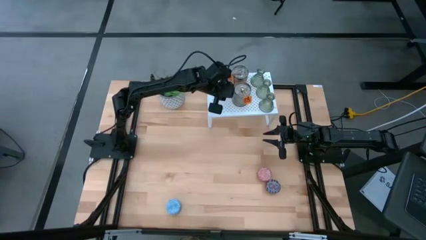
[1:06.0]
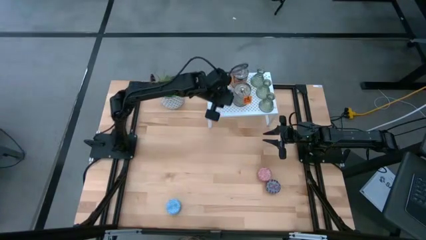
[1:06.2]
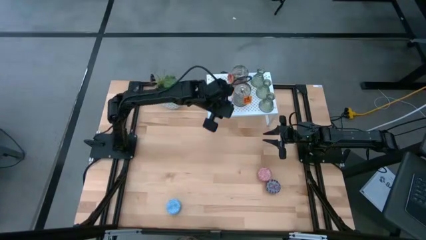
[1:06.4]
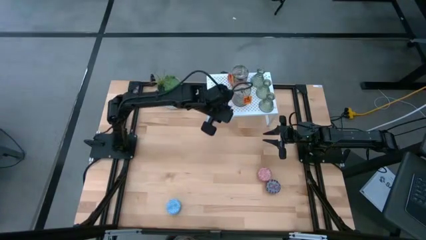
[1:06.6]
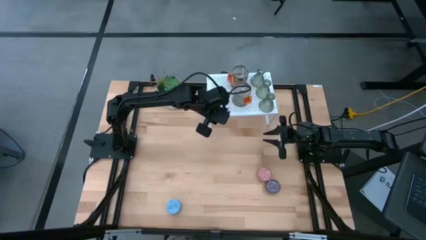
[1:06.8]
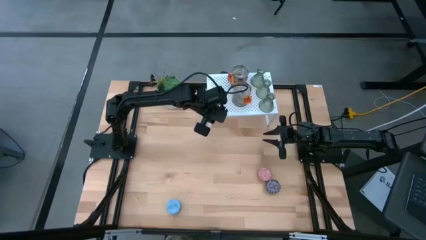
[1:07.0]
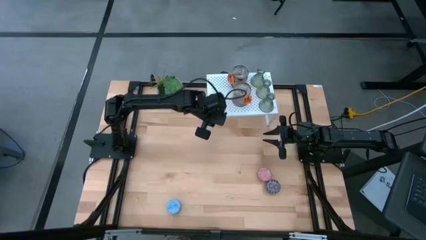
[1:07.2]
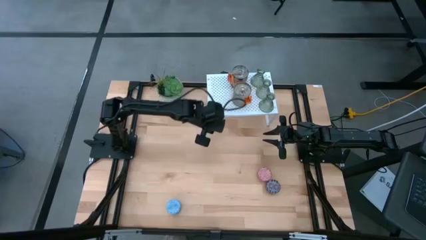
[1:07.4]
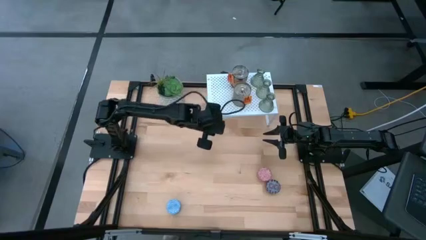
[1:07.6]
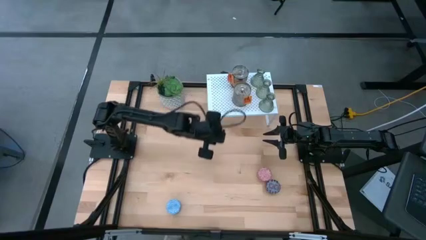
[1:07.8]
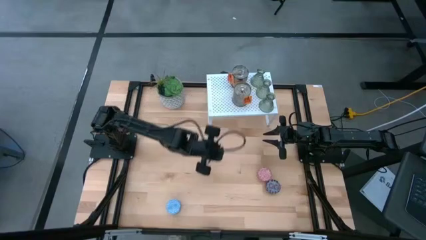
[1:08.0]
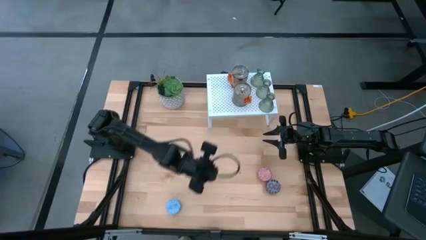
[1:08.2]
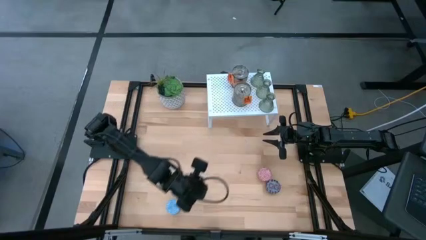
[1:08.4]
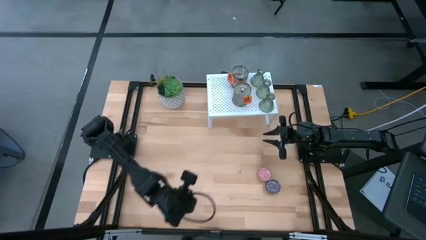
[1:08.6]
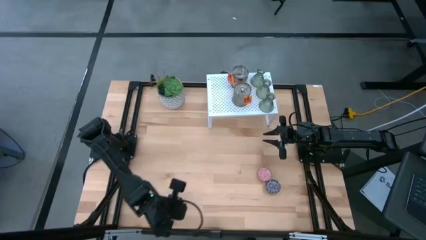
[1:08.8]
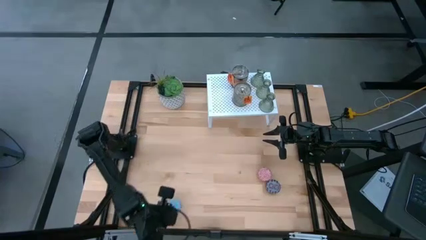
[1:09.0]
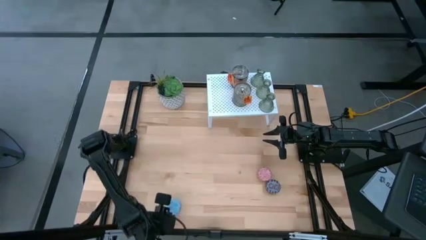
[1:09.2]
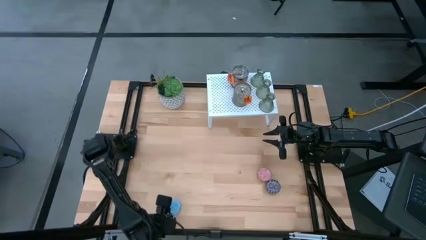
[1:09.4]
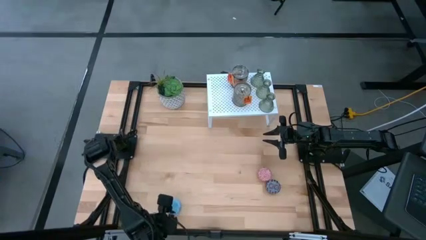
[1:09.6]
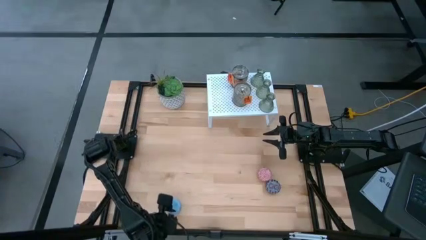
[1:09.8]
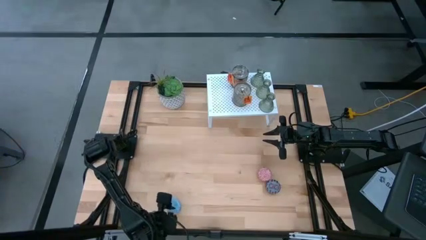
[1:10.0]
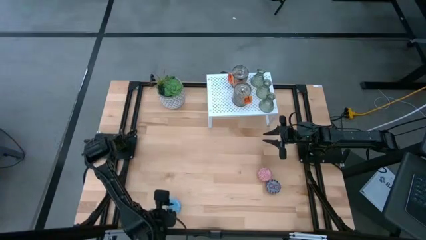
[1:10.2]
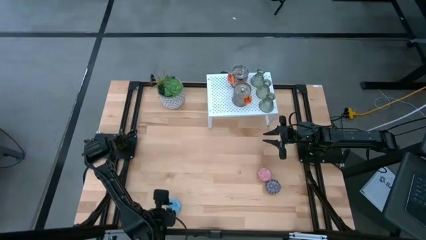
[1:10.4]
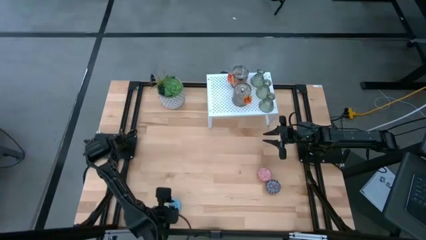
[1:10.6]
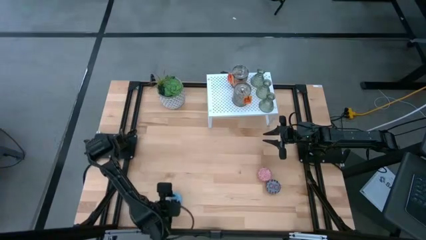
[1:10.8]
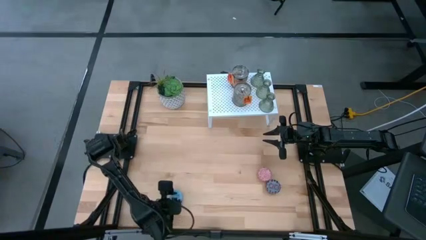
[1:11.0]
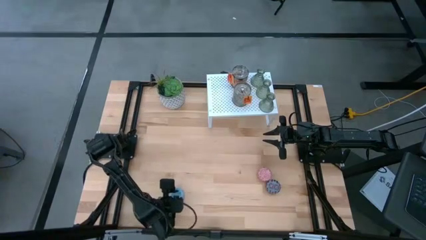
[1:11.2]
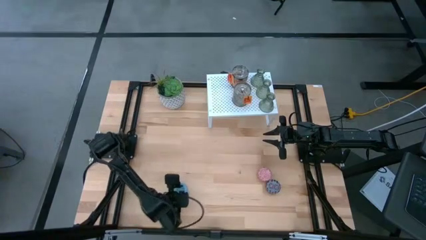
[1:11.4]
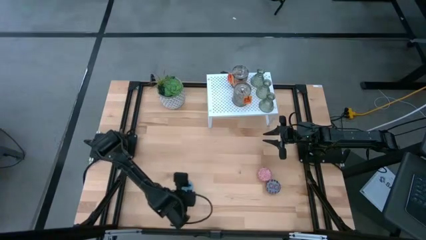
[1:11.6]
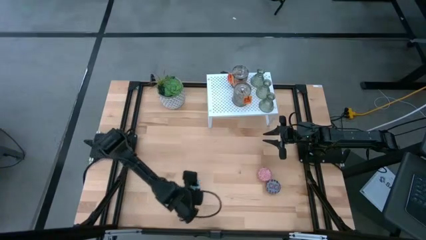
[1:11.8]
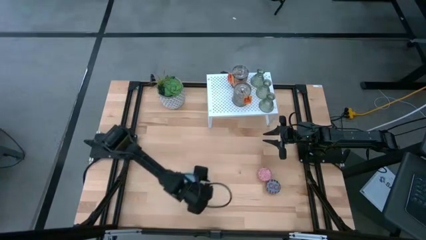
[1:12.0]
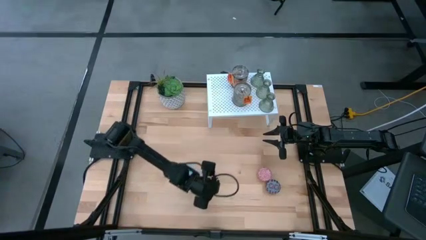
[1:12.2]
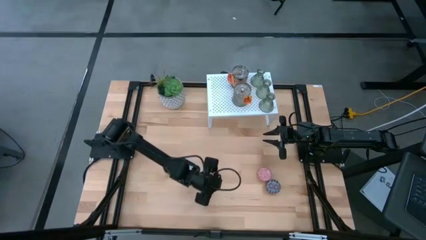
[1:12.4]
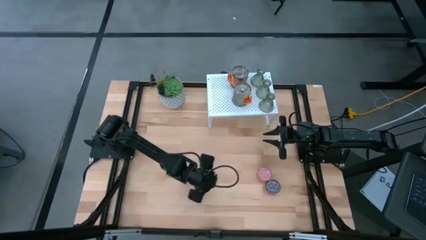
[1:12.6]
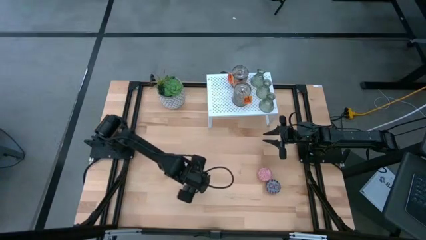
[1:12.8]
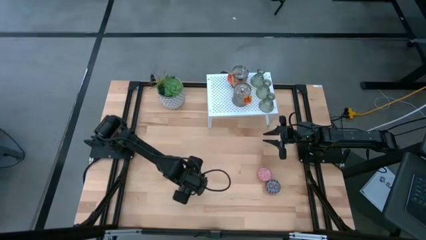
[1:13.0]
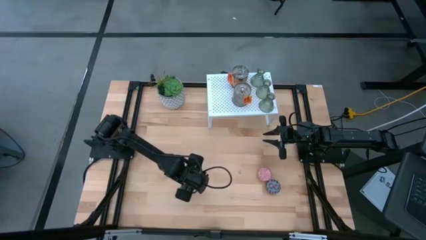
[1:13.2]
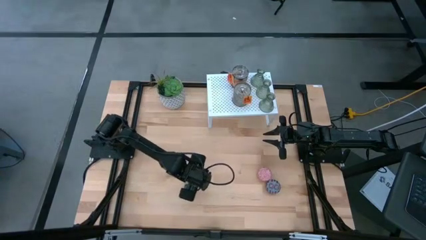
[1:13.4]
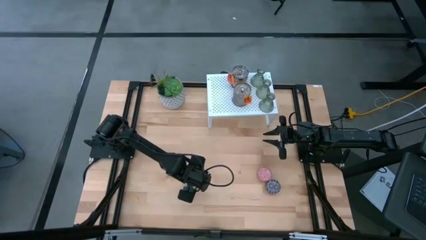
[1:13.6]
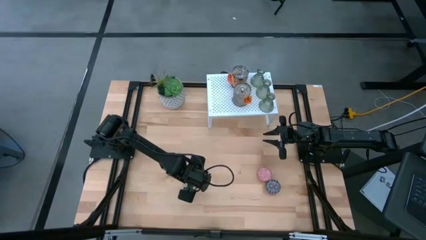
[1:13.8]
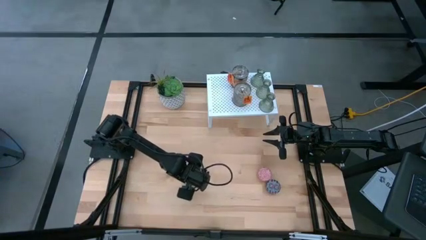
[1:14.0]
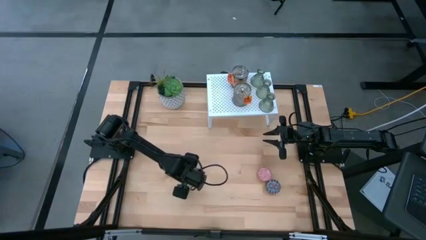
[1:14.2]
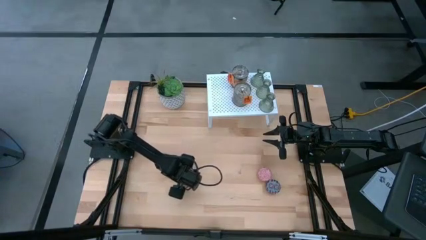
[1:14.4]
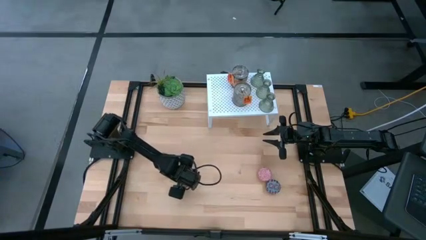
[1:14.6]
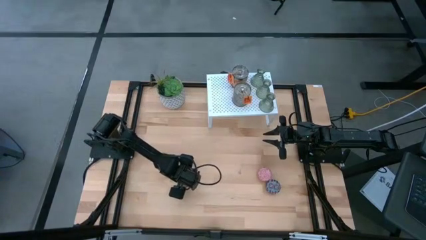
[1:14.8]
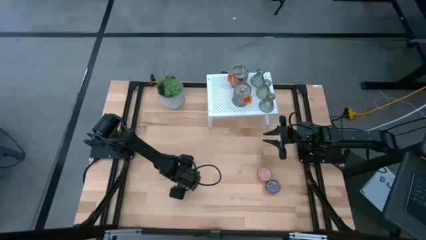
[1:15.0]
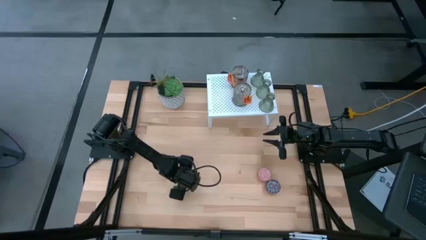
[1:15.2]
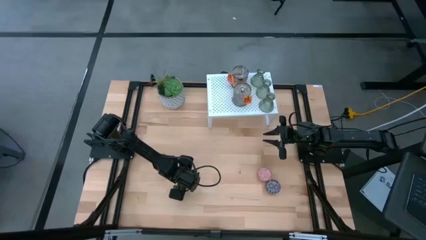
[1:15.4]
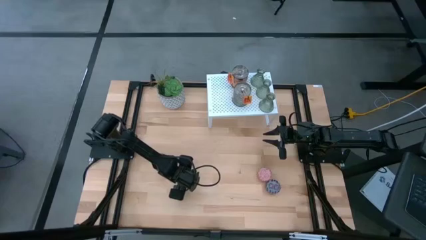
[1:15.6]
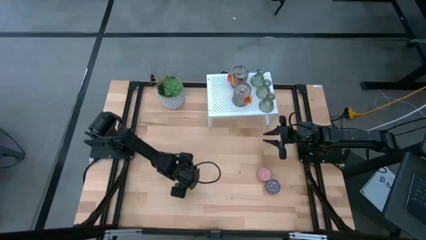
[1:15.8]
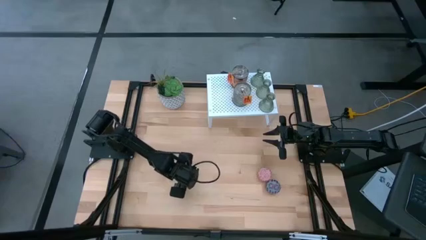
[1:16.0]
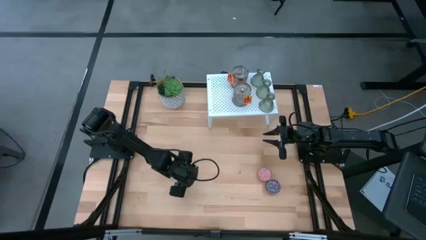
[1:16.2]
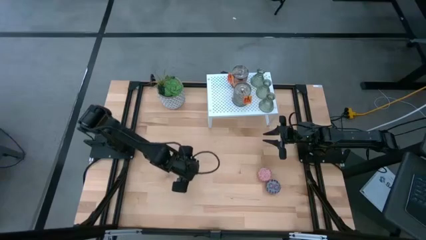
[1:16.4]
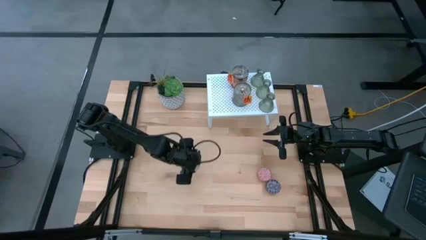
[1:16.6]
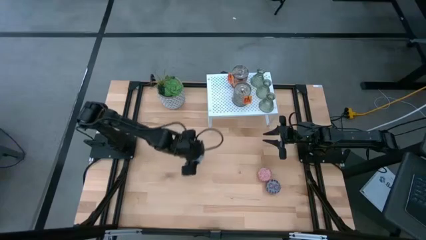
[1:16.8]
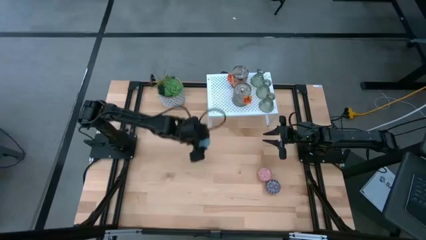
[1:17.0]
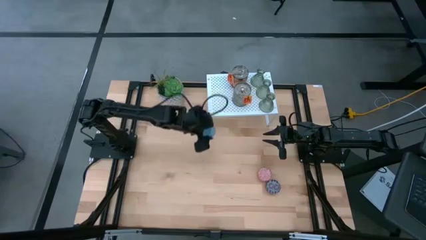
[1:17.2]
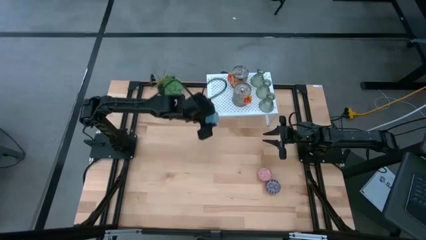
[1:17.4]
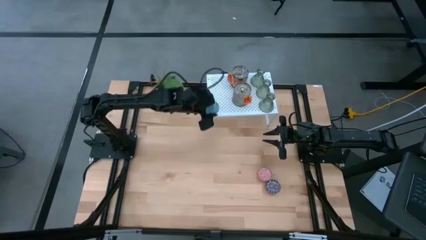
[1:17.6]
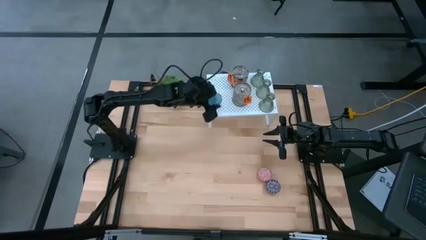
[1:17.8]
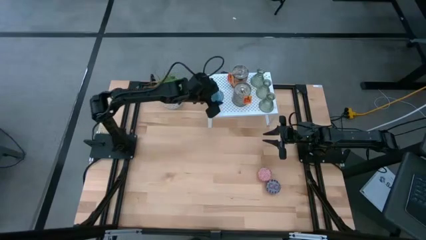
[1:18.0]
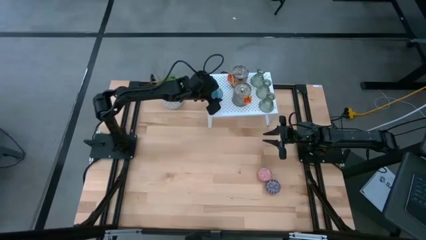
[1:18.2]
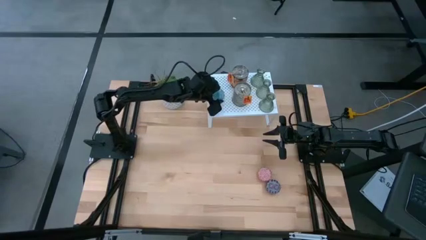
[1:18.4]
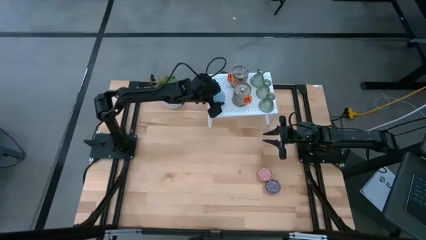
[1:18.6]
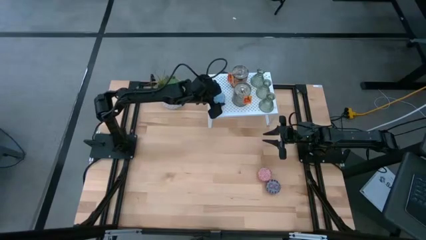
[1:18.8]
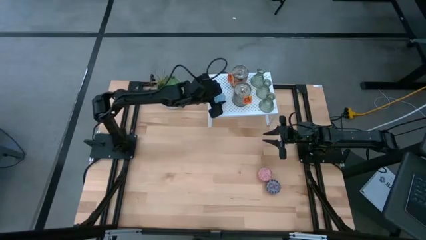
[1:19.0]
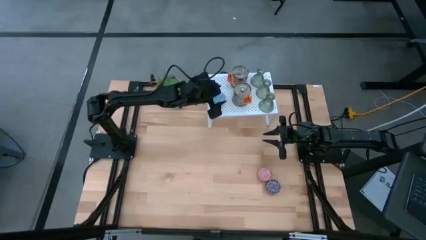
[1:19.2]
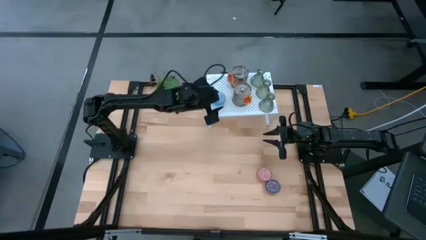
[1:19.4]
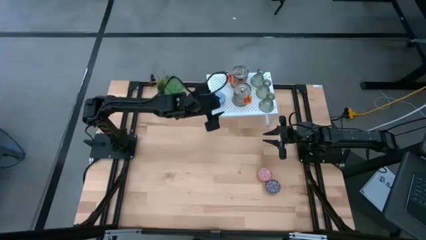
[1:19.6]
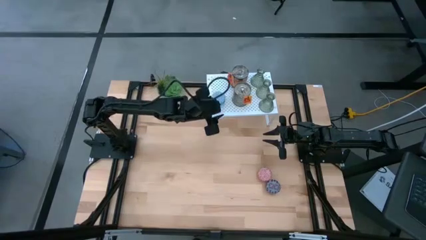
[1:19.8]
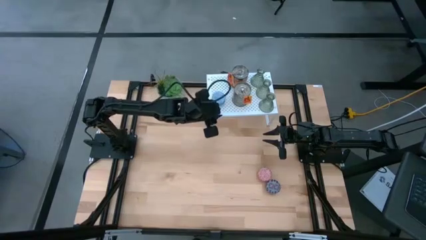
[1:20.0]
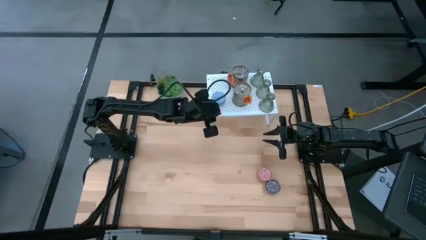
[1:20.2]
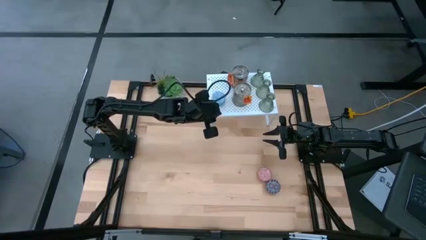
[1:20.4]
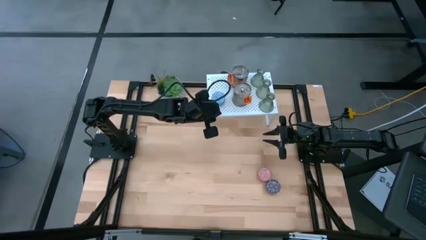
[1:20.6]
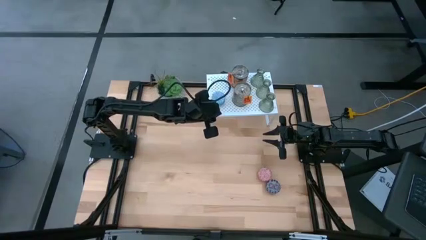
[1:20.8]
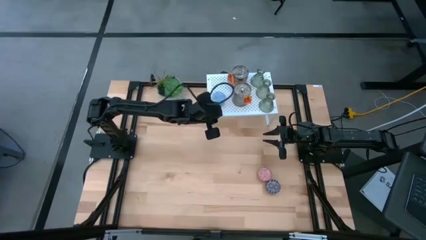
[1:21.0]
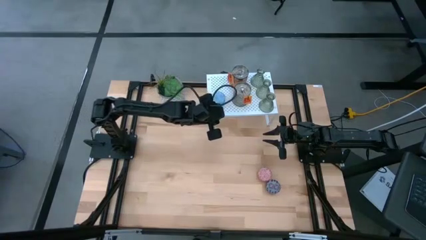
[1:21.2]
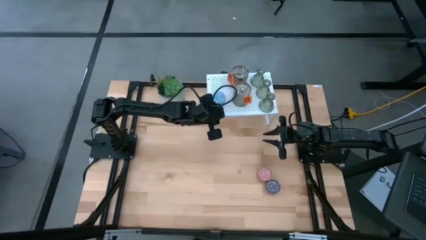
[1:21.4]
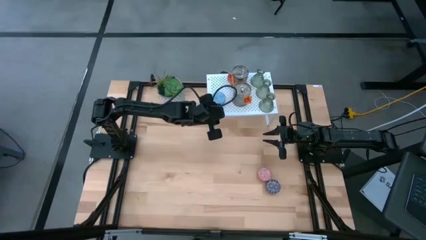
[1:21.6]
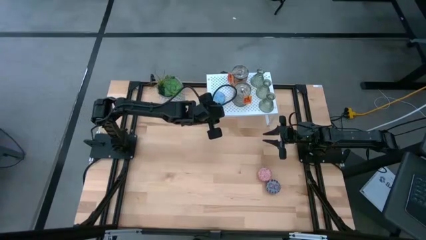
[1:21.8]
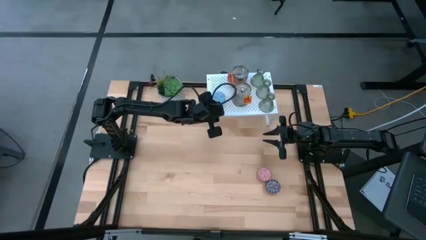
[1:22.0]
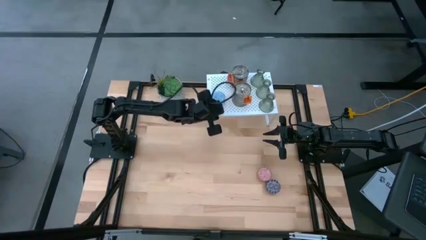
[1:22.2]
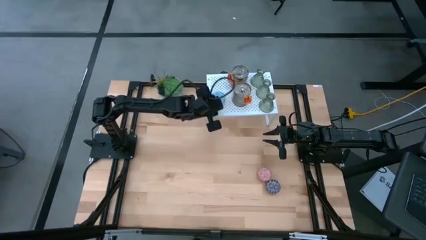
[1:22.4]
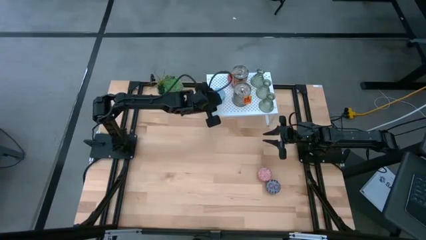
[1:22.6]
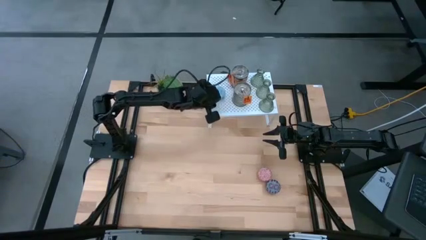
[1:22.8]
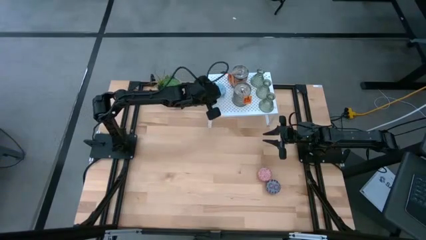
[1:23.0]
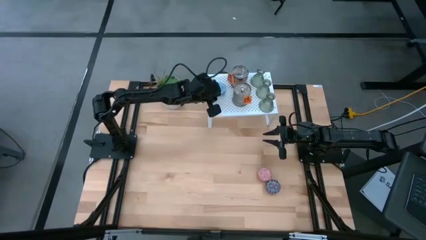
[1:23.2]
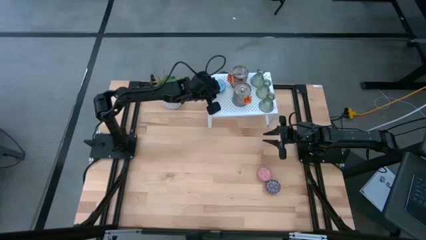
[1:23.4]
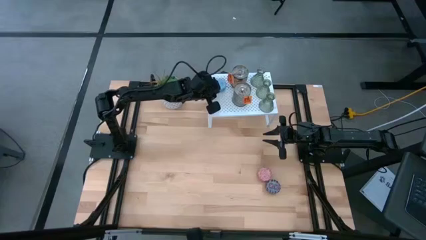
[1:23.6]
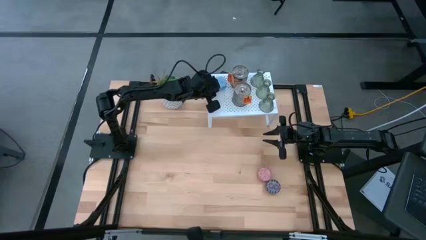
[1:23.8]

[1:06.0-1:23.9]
Task: Pick & Place candle stick holders
Put the blue scented candle on the shelf
